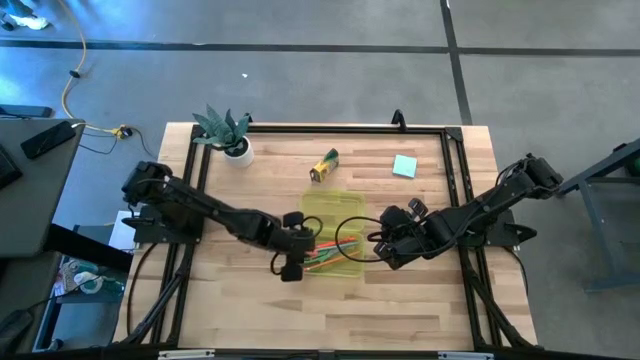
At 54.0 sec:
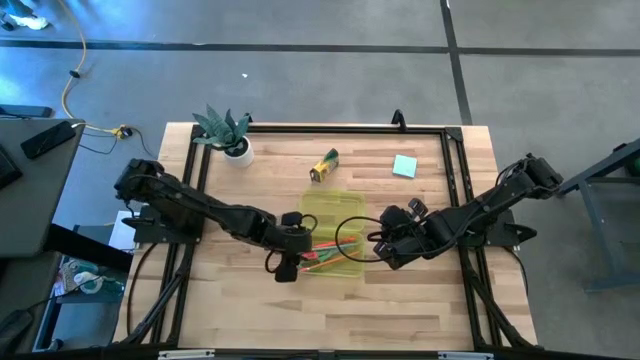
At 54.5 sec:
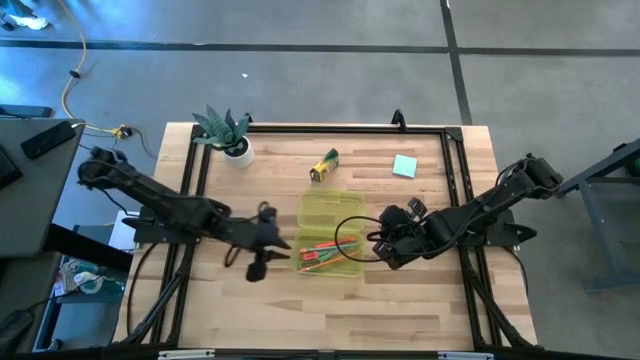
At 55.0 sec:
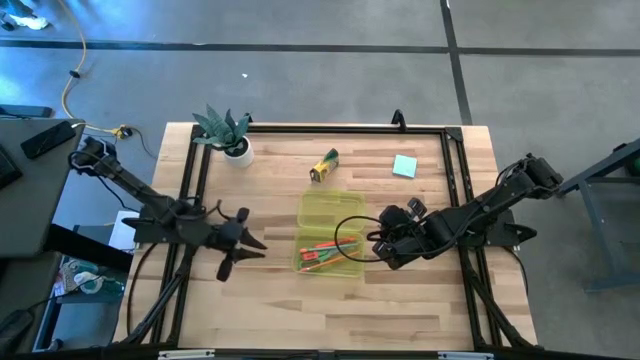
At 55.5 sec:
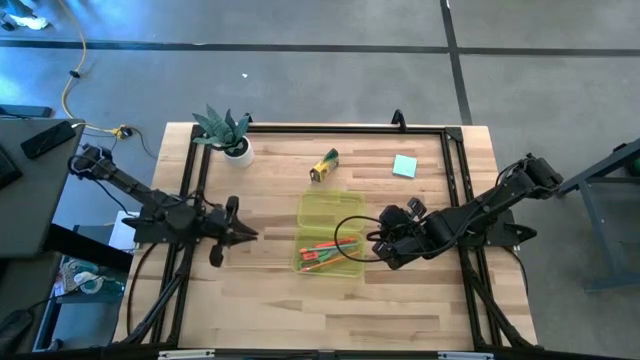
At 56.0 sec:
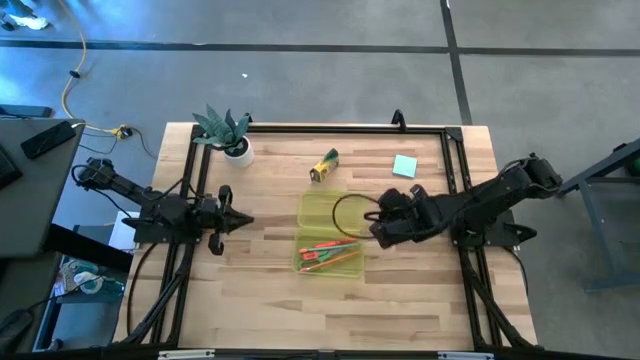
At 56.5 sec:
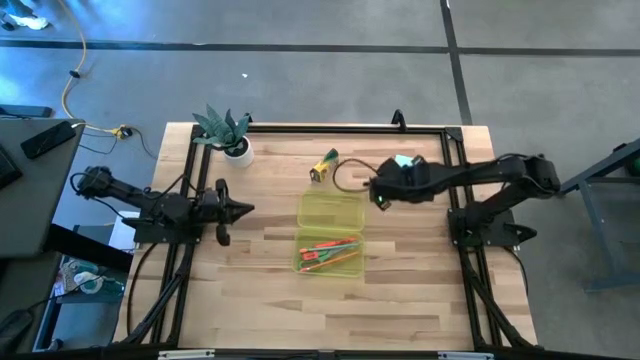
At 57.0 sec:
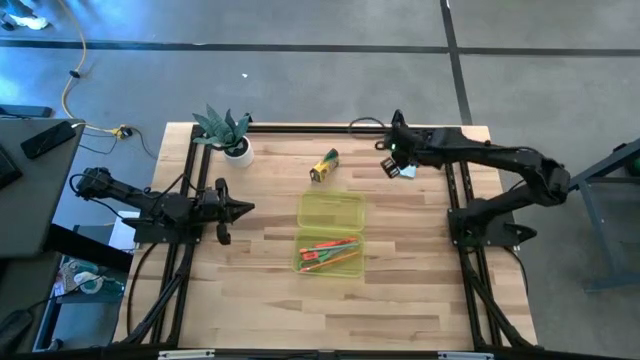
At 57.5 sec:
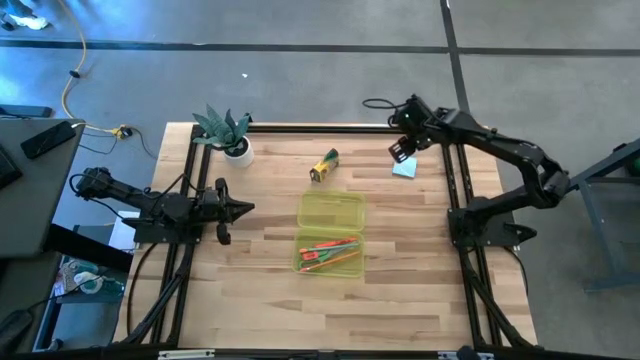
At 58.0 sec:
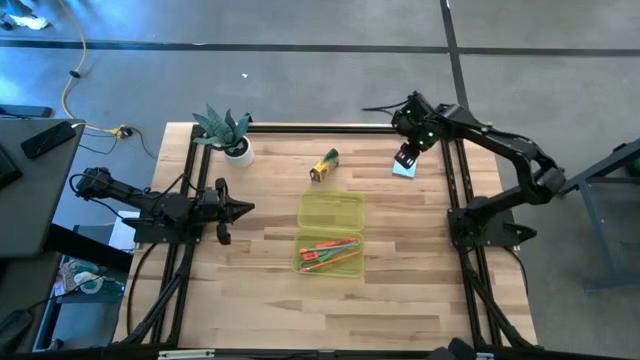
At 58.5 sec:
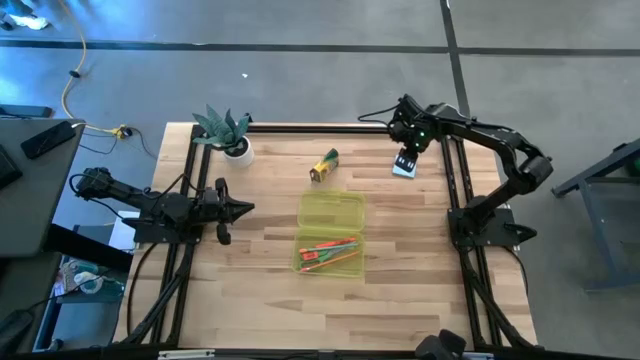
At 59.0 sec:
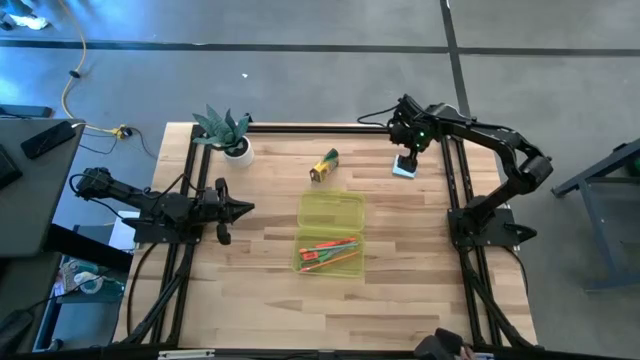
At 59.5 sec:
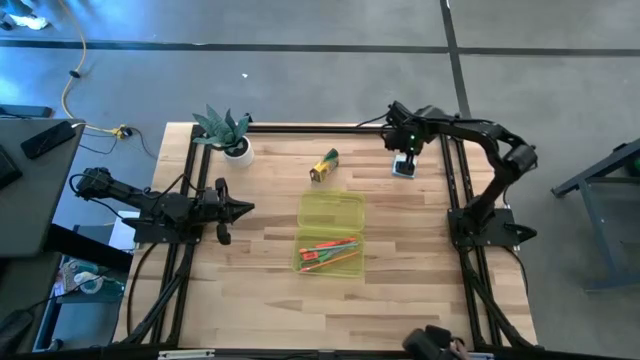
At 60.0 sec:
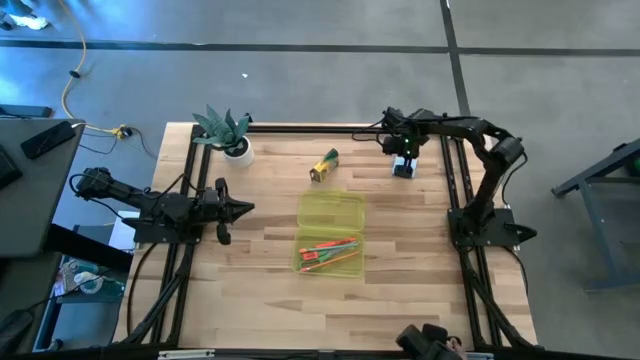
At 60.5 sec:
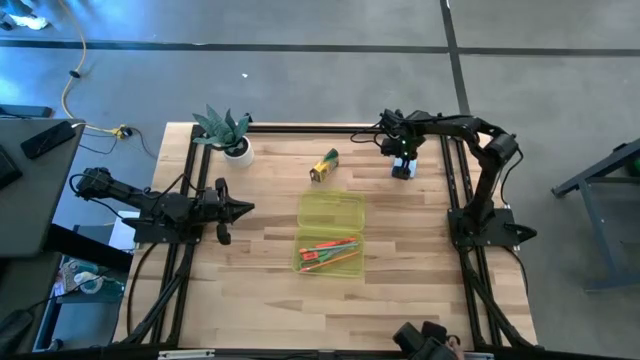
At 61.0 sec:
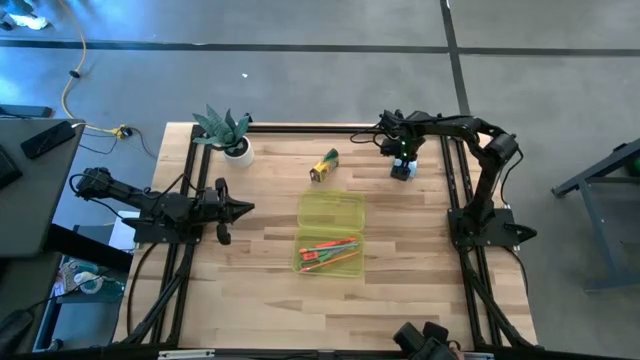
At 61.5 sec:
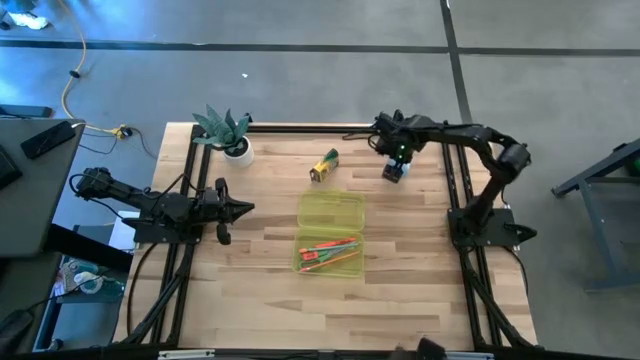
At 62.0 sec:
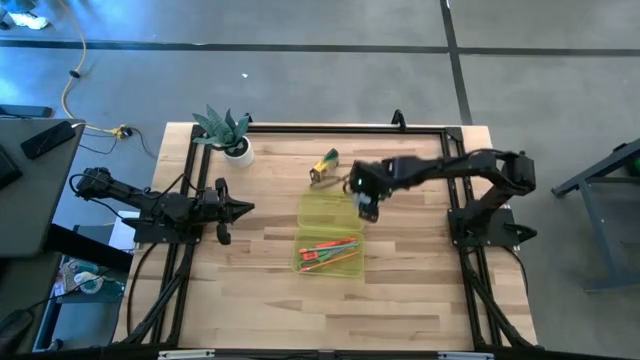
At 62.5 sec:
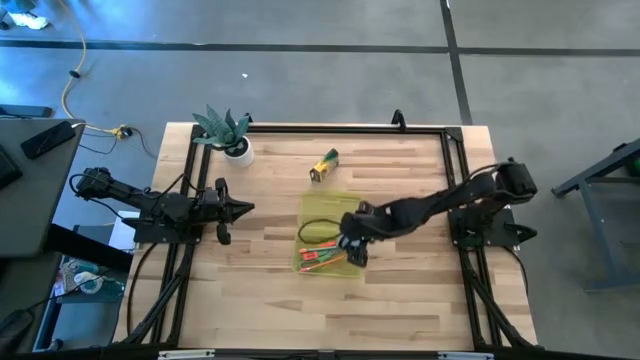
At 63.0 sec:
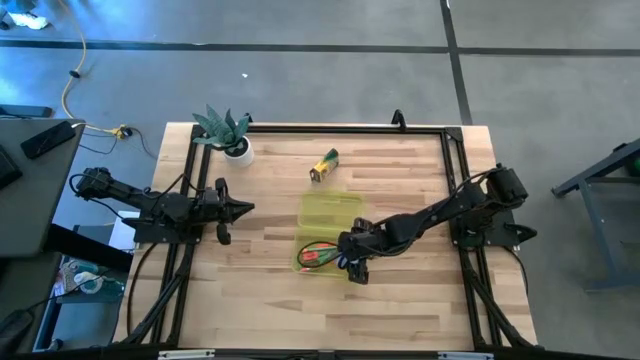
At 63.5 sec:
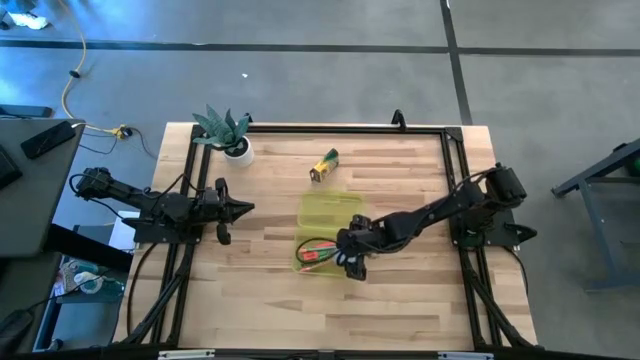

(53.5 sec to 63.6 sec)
Task: Pack school essentials
Put the sticky notes into the yellow box

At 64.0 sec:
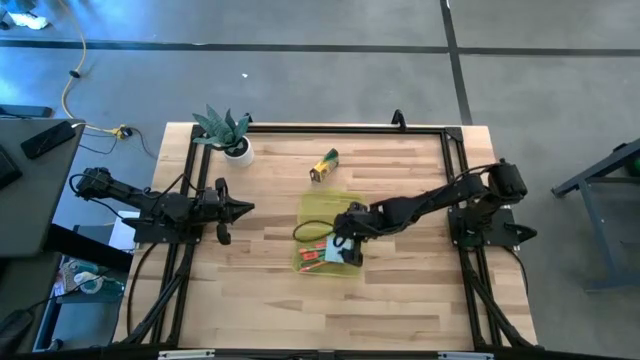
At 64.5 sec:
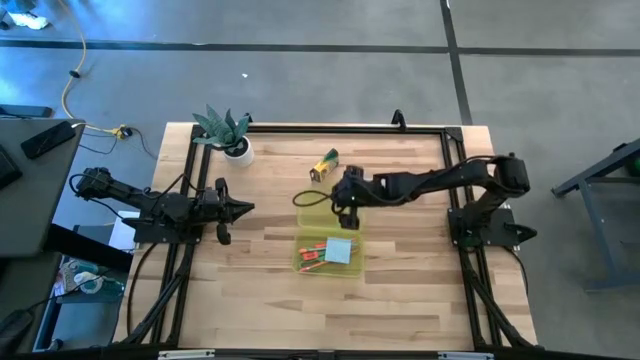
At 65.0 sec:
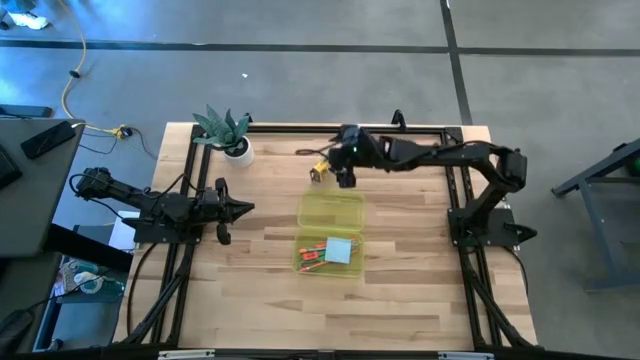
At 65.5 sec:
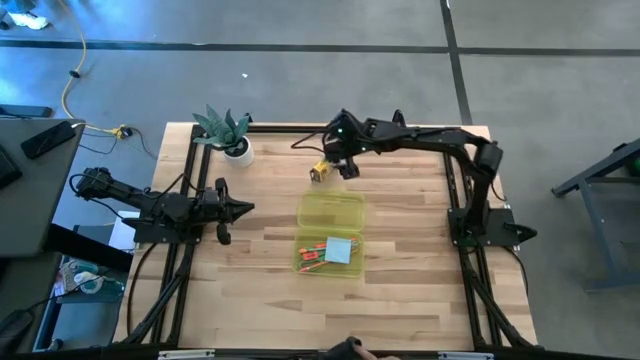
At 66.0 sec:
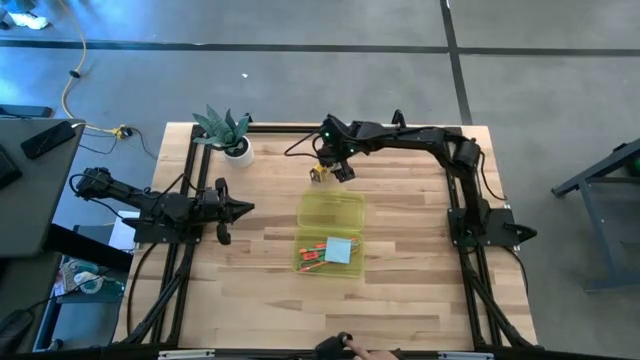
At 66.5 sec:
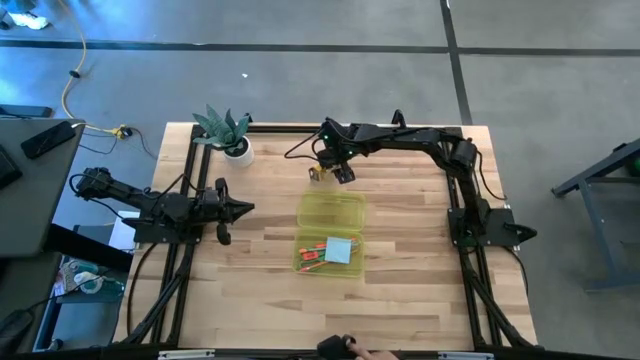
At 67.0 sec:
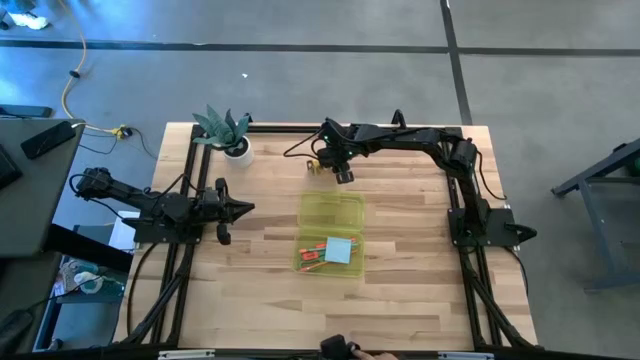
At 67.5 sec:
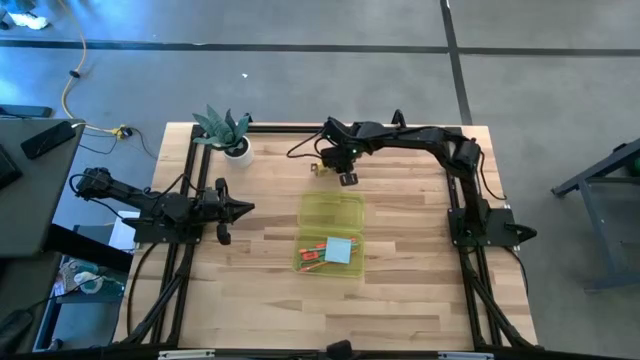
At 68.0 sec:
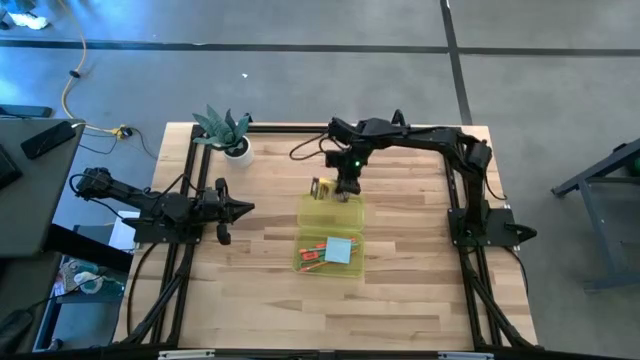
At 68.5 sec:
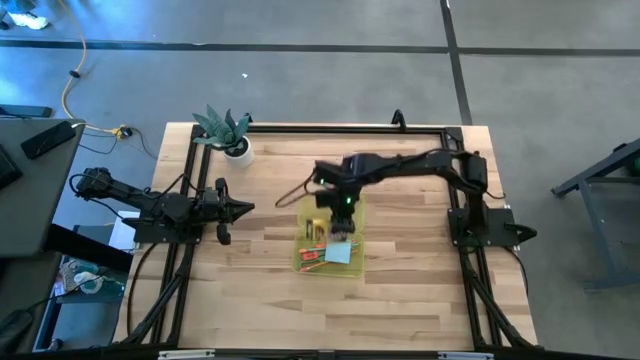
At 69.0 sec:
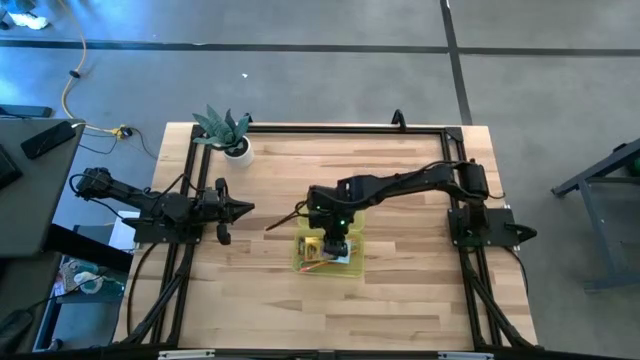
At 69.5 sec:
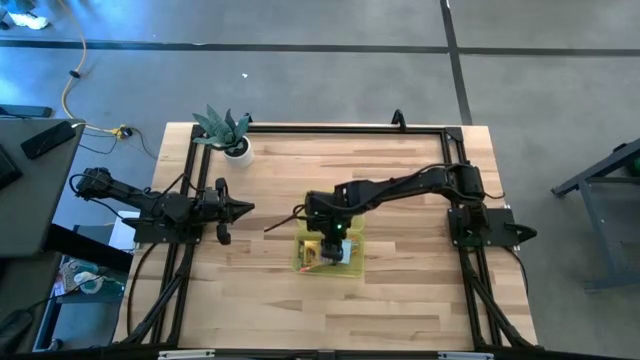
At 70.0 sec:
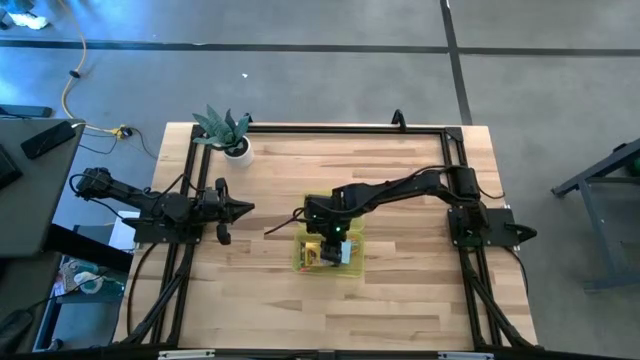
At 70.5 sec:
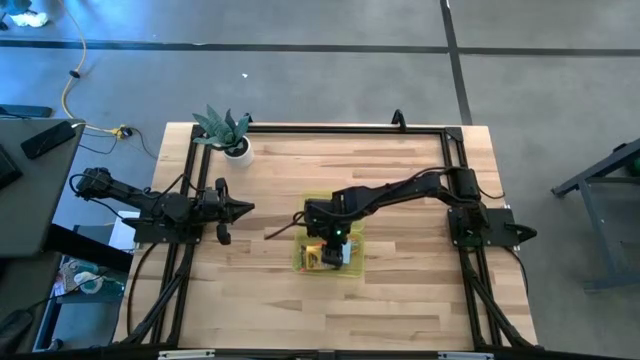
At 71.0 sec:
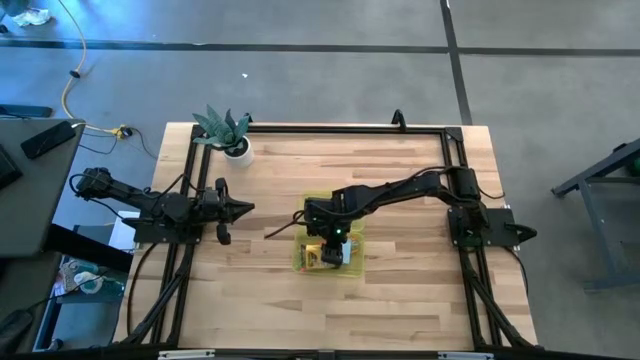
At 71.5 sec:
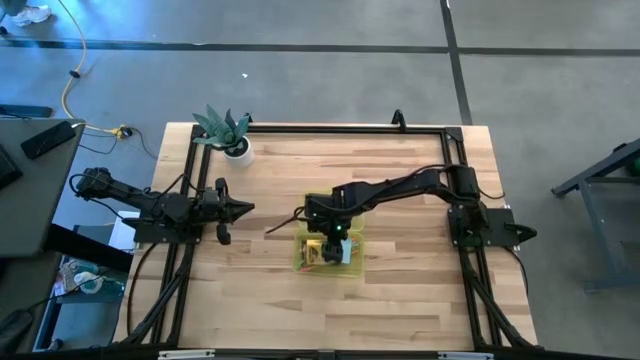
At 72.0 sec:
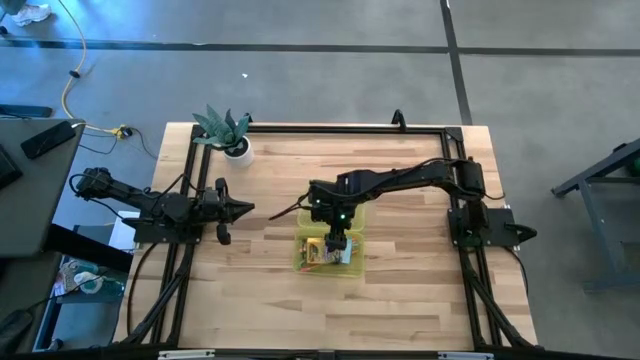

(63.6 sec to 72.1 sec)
Put the yellow crayon box into the yellow box
